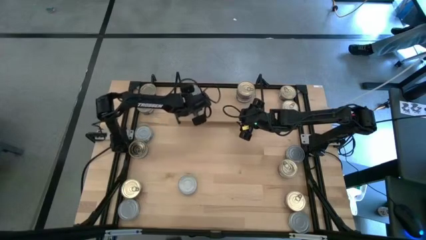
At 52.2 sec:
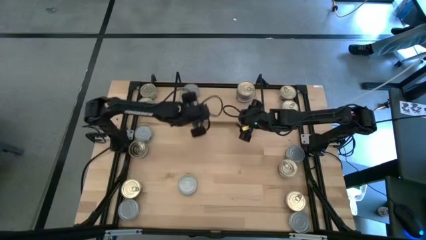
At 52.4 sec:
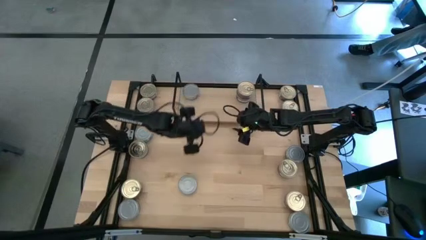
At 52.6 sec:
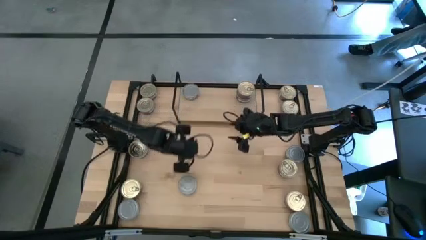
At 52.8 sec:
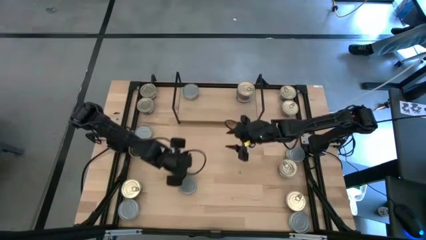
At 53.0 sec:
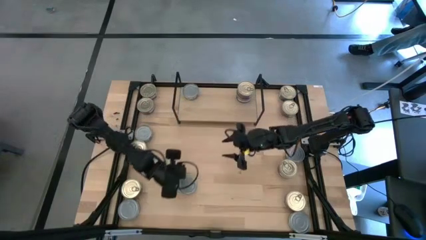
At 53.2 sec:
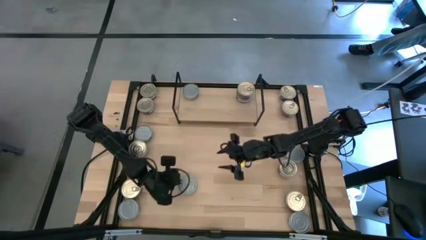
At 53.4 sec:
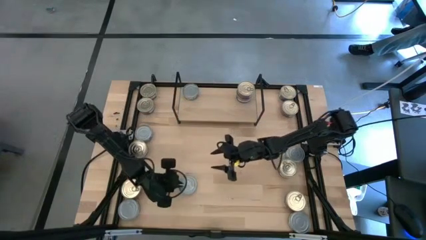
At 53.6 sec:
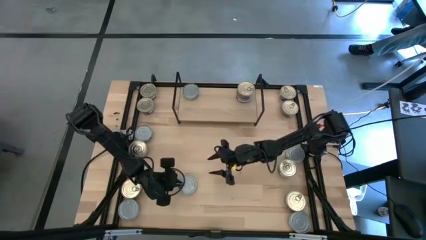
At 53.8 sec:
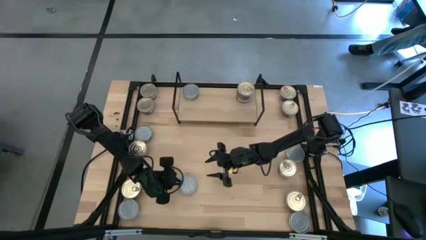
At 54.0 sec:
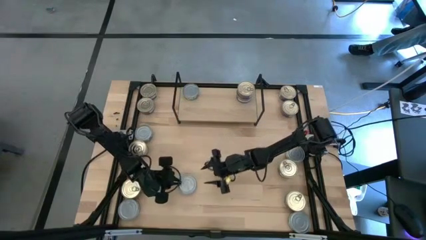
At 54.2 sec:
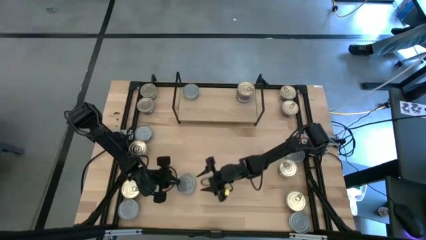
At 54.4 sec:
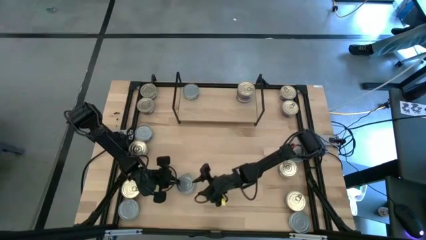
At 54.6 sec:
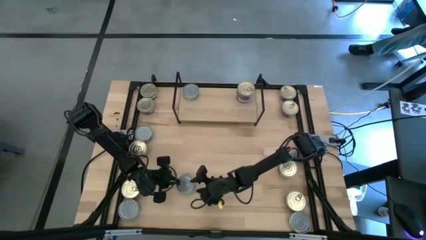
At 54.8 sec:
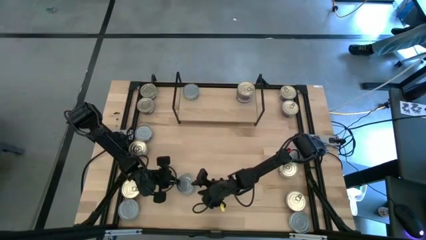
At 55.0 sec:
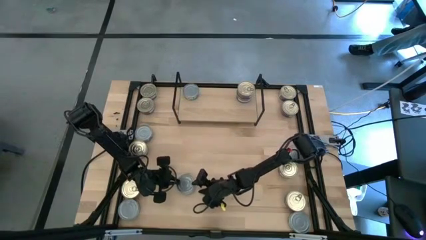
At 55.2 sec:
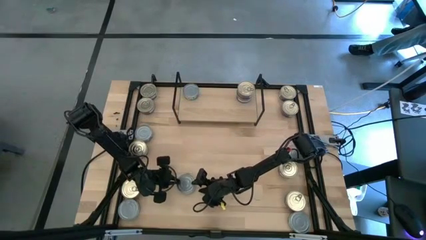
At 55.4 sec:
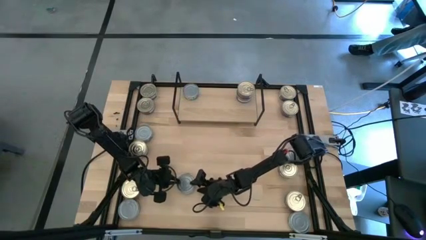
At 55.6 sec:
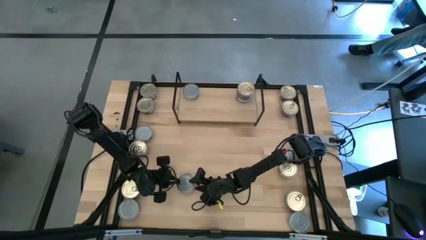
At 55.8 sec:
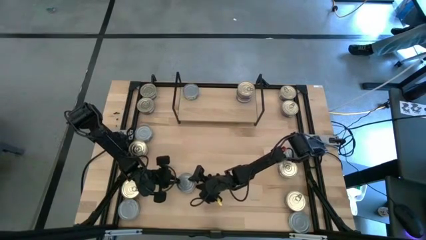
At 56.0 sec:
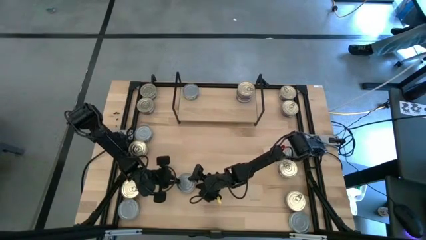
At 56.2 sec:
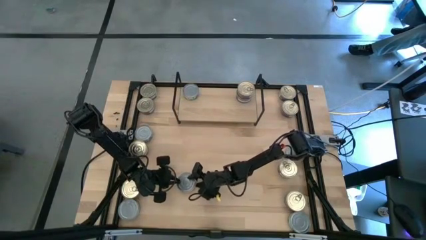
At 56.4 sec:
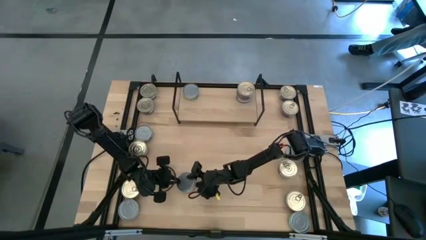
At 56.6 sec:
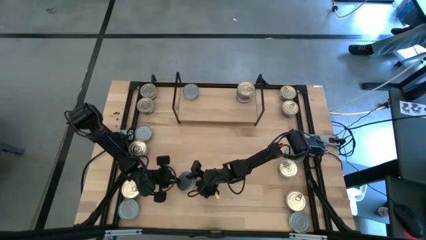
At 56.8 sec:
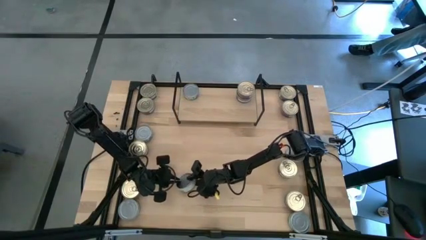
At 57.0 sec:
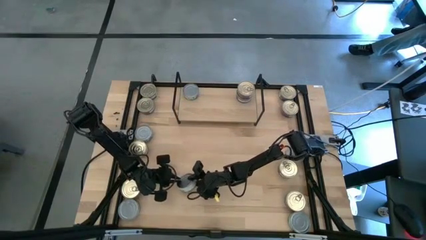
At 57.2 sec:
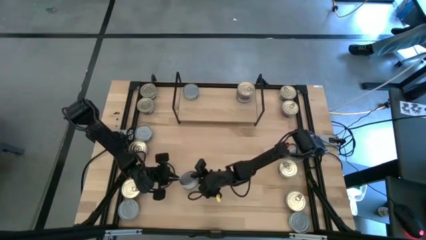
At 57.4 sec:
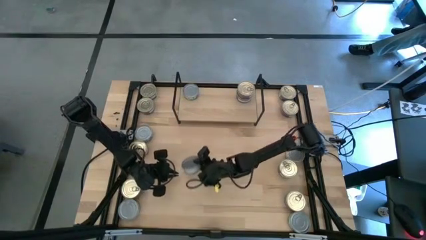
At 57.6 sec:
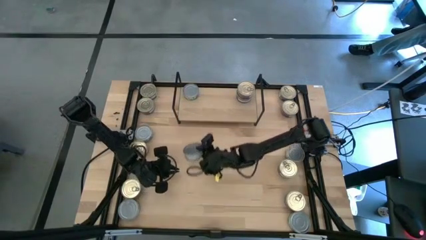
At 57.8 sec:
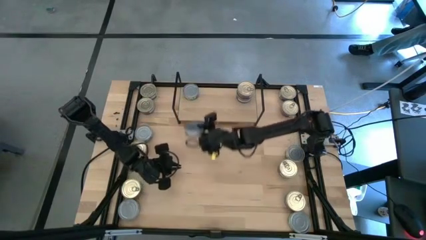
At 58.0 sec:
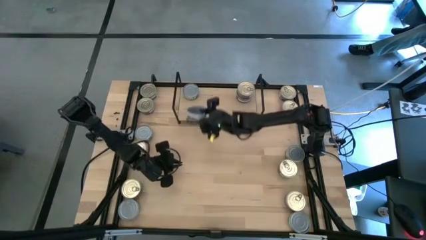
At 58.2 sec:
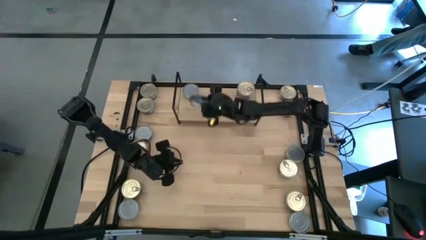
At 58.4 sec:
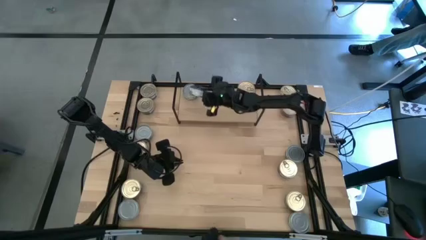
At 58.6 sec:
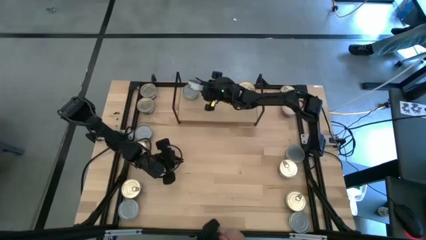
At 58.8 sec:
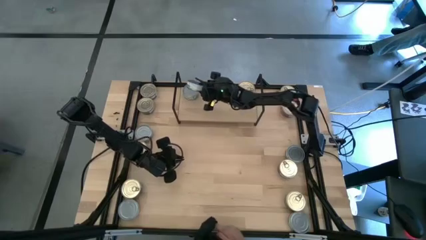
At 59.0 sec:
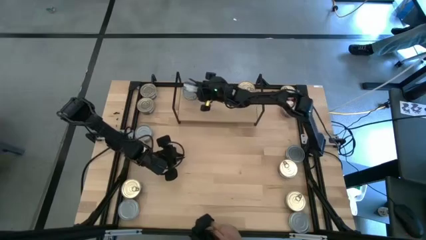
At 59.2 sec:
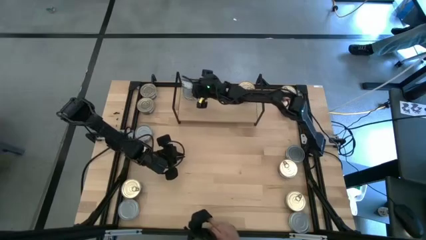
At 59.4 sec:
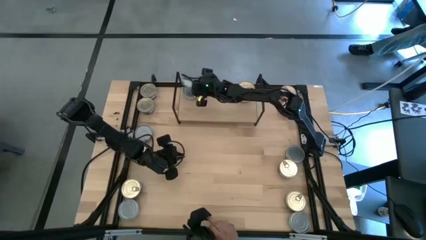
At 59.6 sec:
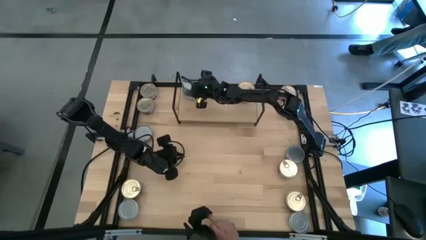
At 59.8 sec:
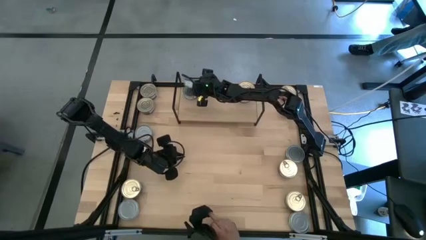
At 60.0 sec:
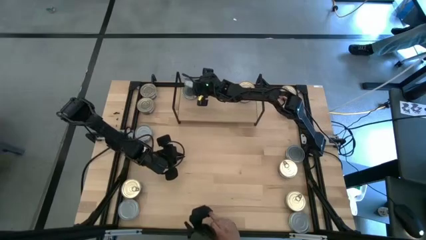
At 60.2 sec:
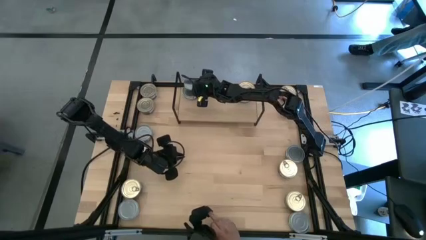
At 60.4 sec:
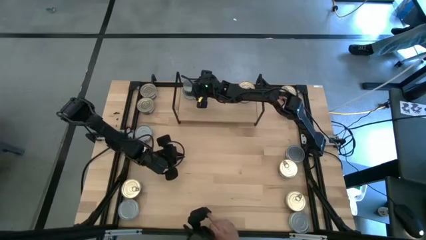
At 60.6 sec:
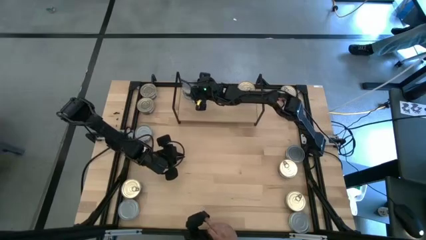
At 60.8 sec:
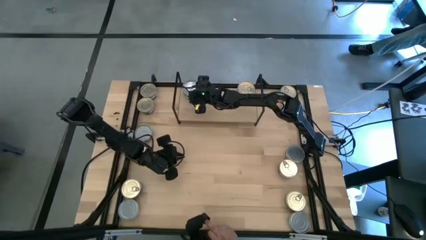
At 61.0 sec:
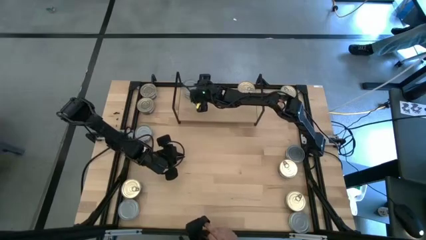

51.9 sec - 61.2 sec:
Task: Stack canned seafood by type on shelf
Stack the green white tuna can on top of the other green white tuna can on the shelf

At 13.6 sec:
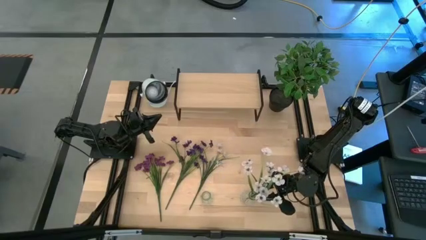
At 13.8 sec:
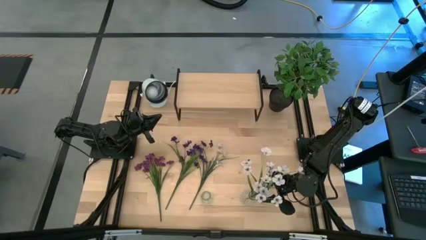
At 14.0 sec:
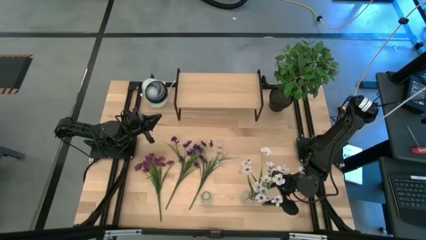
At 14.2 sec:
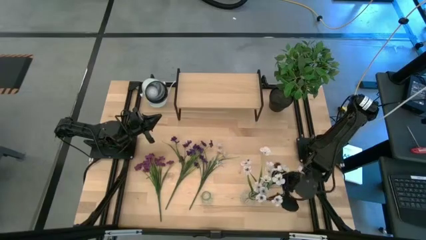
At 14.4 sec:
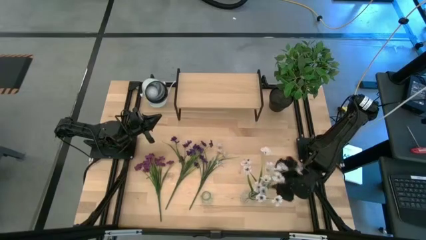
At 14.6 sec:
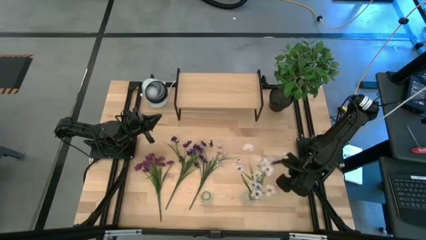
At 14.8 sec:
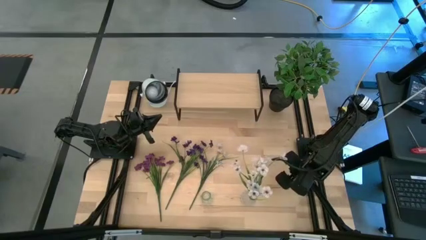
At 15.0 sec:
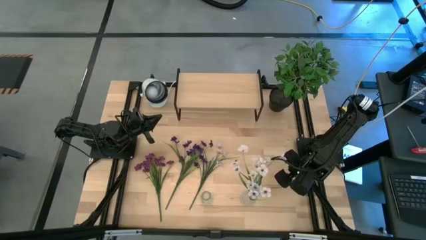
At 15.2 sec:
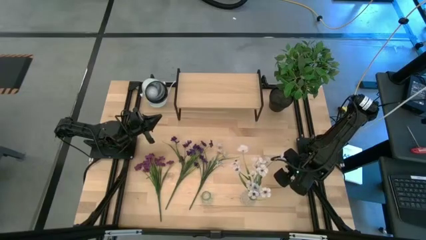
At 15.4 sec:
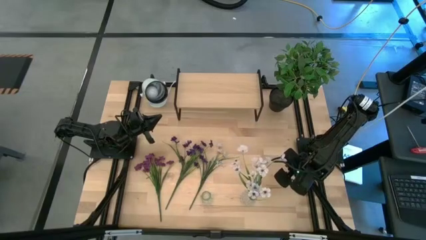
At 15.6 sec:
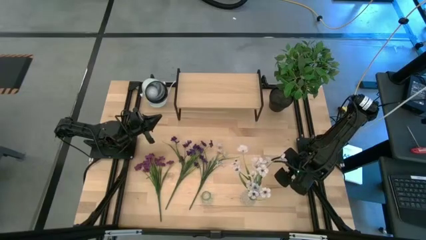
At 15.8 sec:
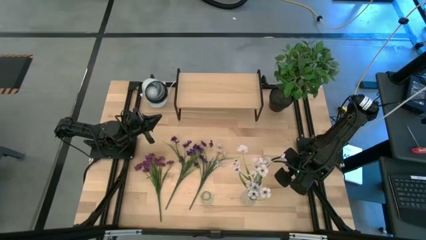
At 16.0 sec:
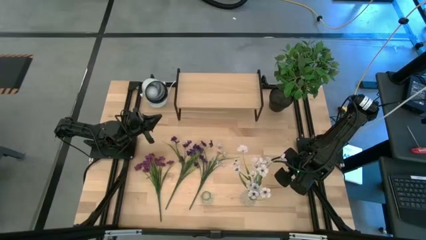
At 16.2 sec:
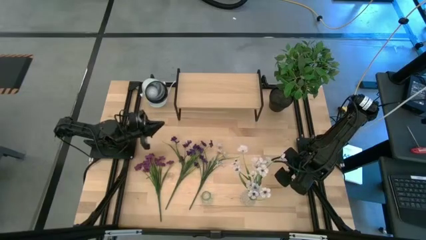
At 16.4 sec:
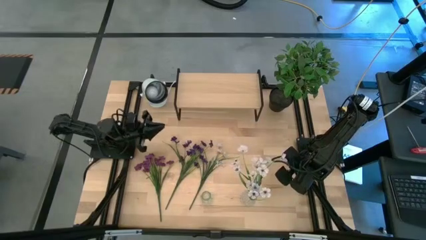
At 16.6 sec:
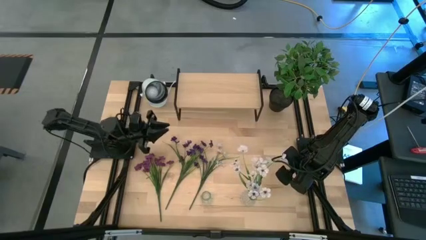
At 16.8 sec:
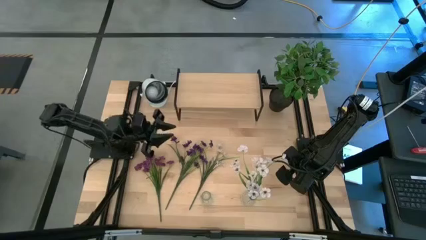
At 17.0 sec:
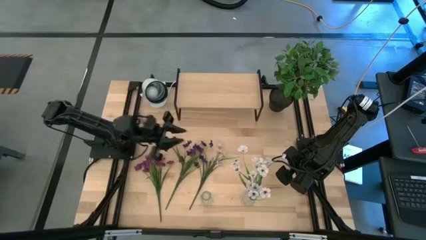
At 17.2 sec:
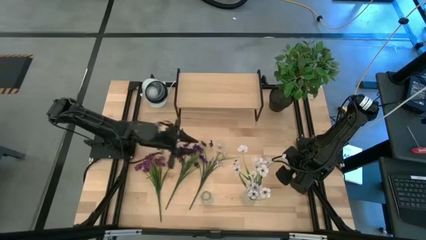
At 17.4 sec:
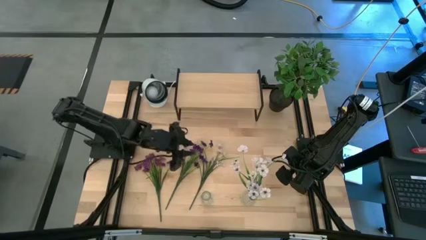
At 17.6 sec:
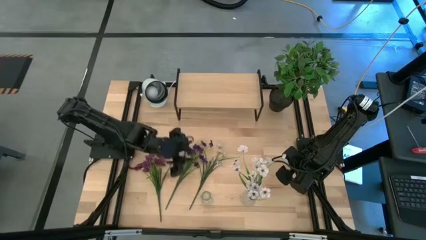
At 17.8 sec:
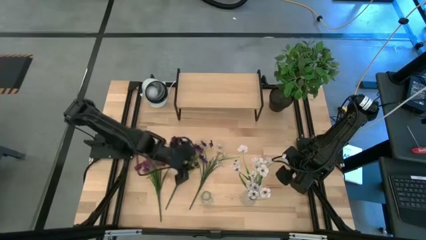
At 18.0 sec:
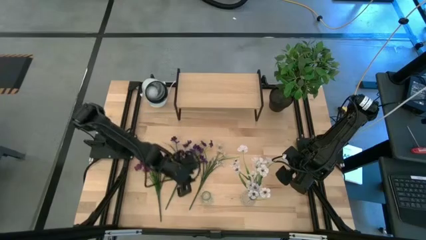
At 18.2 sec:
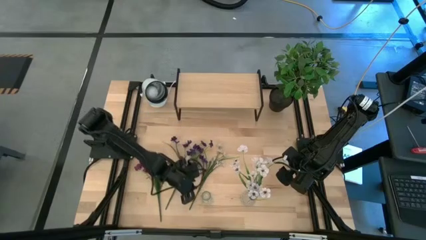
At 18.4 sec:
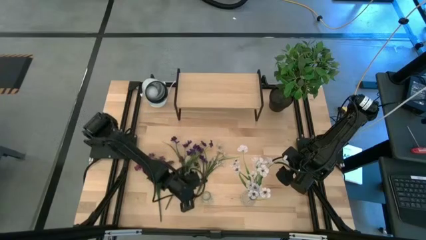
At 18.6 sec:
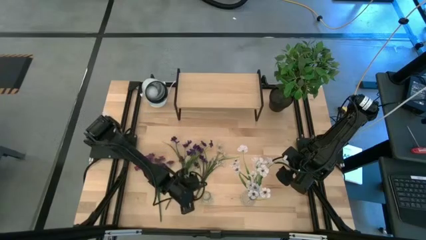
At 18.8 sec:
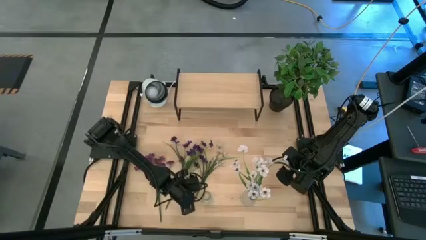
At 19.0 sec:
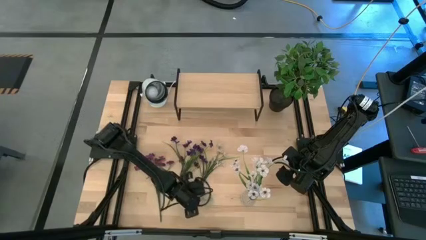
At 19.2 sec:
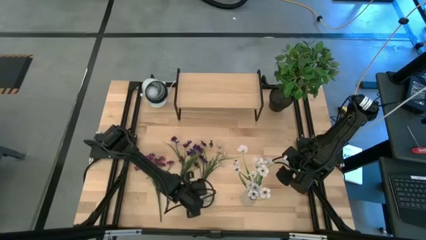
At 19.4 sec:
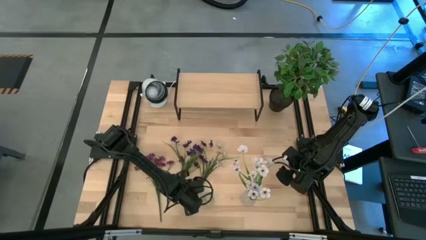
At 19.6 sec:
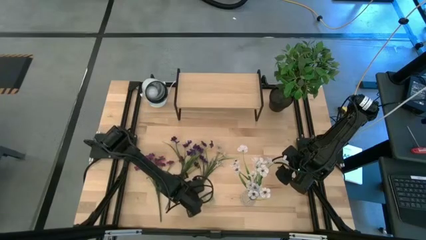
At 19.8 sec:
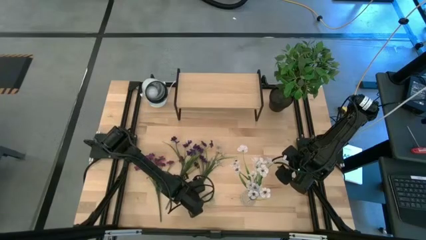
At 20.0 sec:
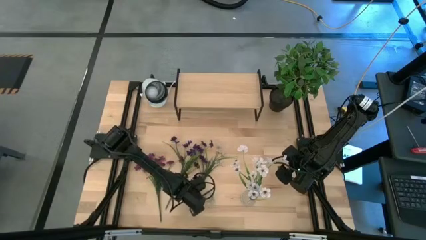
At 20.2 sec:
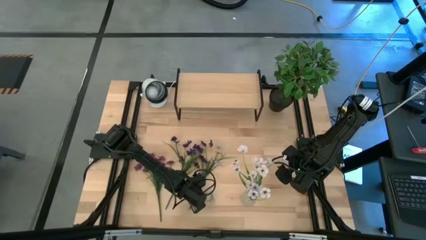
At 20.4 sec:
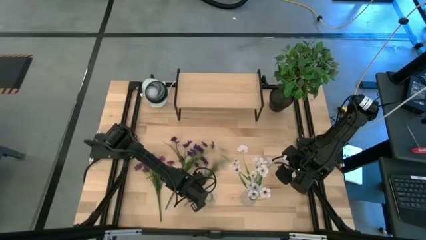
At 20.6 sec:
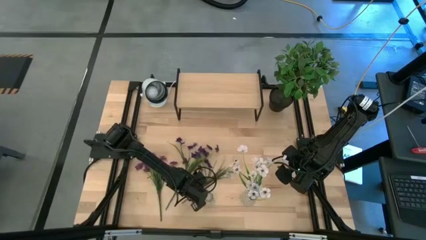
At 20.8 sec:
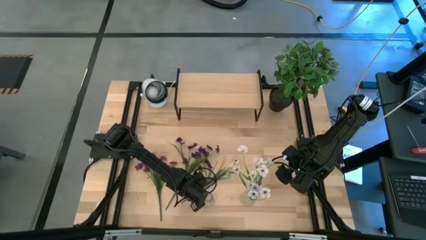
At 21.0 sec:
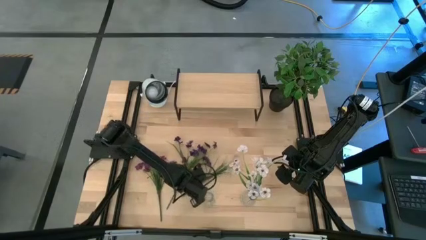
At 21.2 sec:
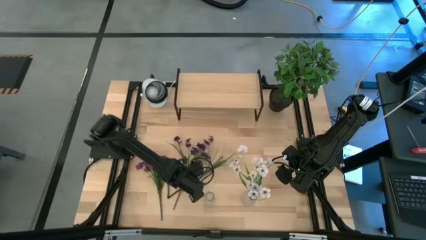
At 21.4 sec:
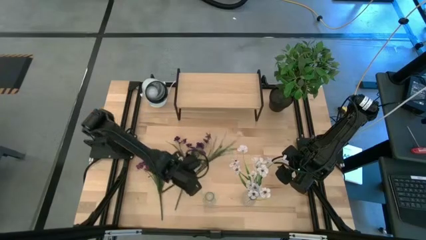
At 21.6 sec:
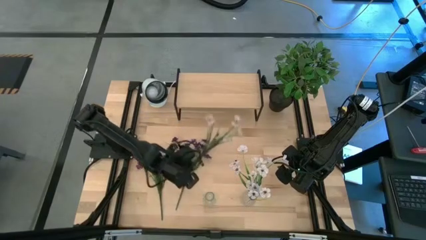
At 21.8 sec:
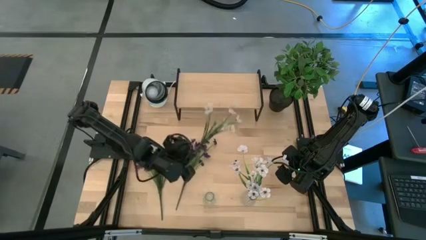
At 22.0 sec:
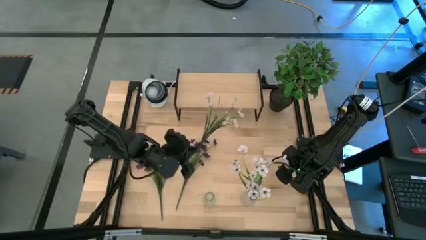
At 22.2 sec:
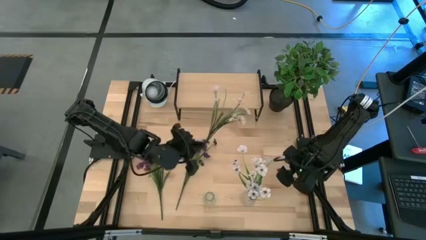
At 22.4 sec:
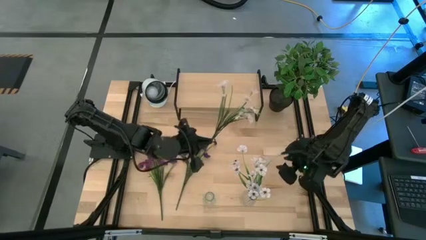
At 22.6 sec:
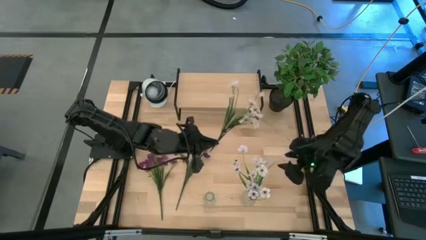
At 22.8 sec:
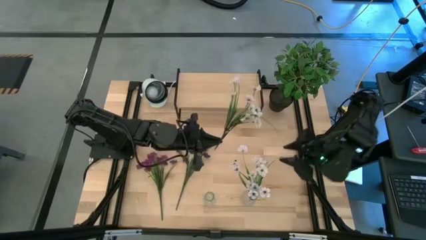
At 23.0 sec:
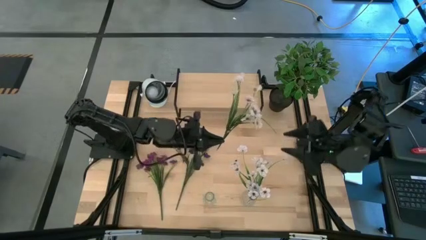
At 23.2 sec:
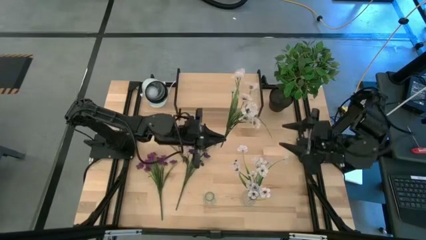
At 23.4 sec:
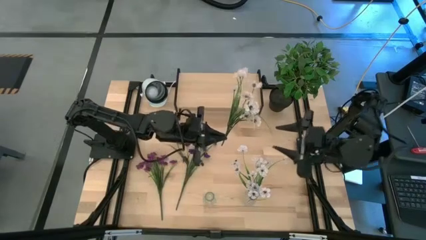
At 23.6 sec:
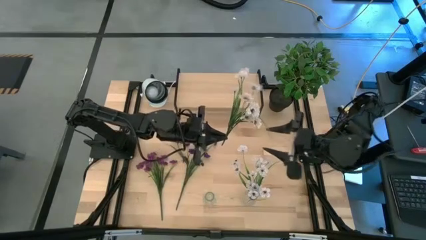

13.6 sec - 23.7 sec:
Task: Pick and place flowers into a vace then onto a shelf
Put the white flowers into the right transparent vase
